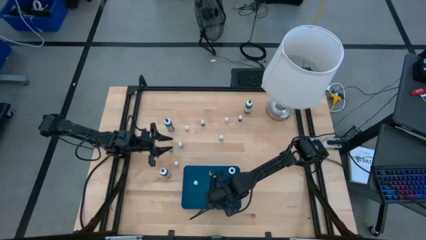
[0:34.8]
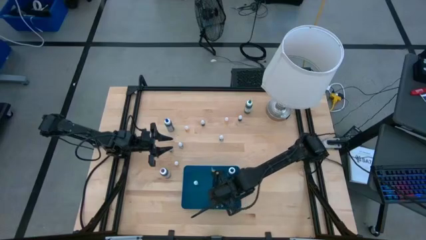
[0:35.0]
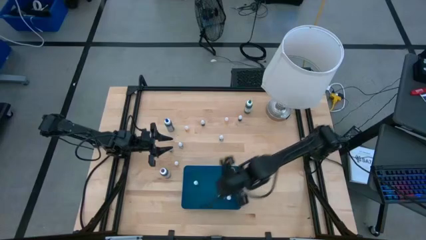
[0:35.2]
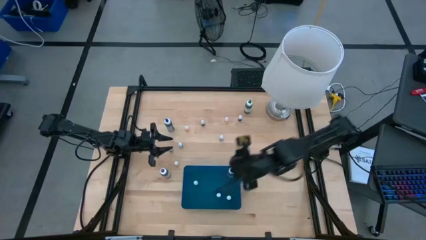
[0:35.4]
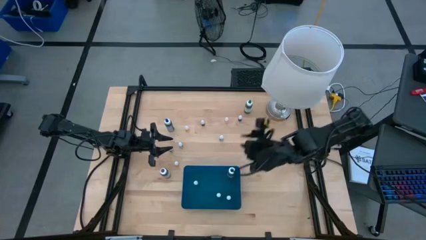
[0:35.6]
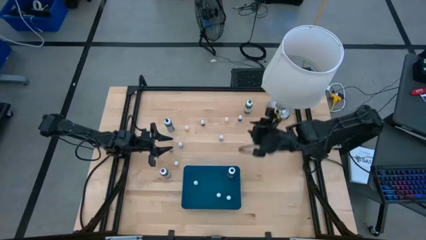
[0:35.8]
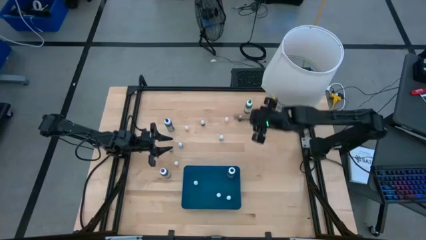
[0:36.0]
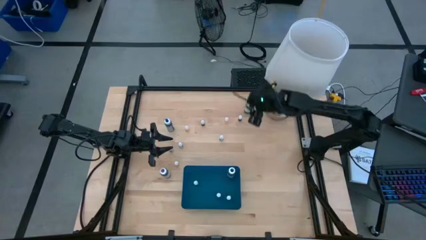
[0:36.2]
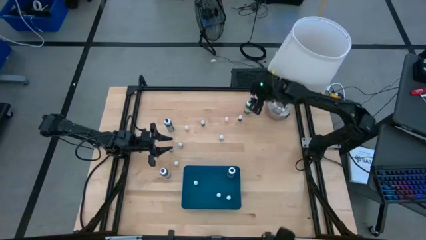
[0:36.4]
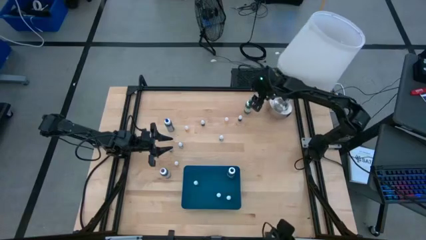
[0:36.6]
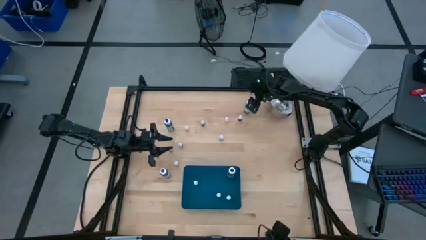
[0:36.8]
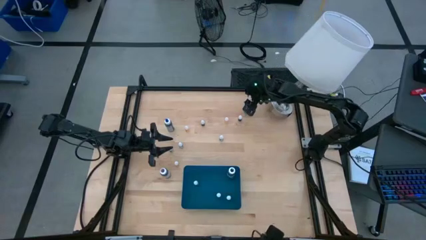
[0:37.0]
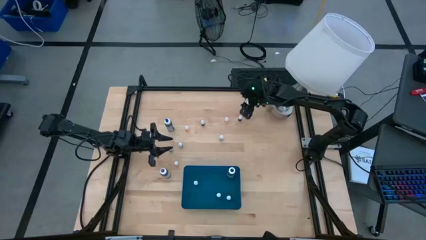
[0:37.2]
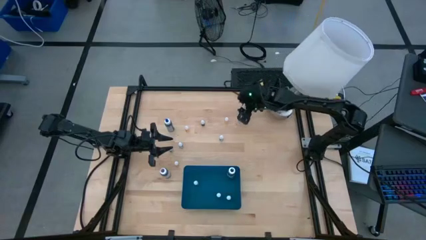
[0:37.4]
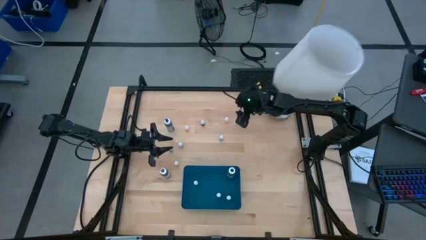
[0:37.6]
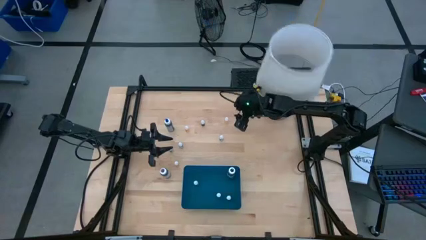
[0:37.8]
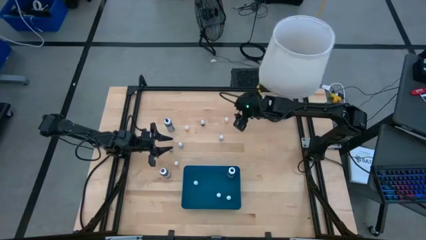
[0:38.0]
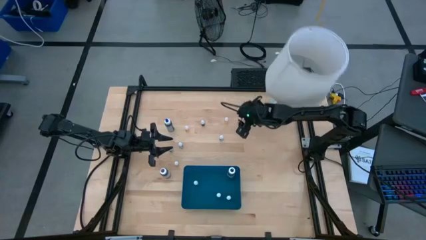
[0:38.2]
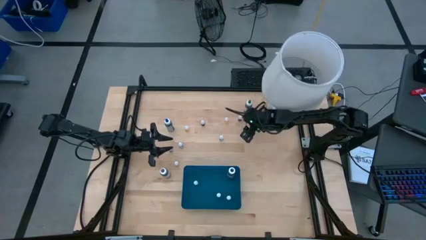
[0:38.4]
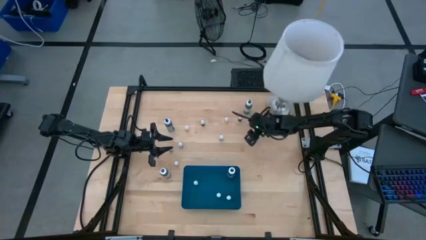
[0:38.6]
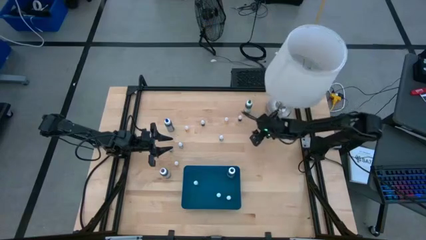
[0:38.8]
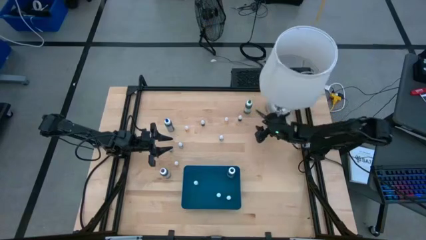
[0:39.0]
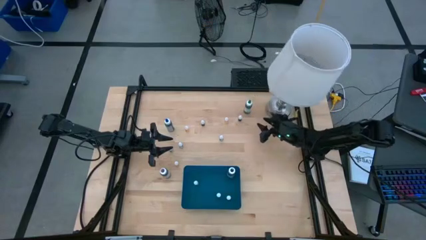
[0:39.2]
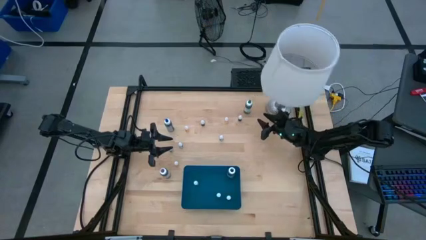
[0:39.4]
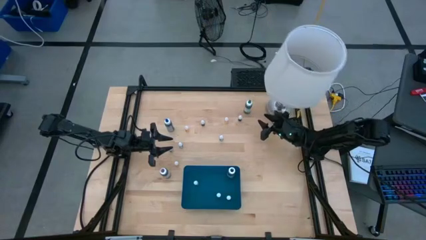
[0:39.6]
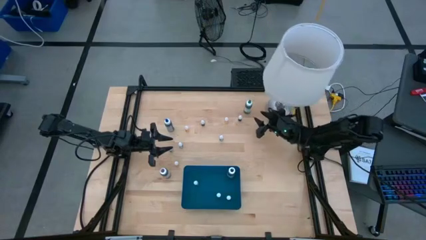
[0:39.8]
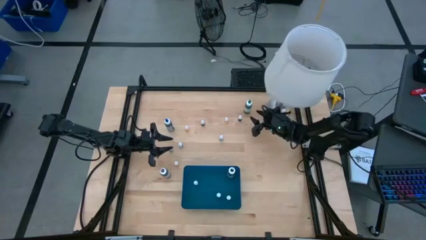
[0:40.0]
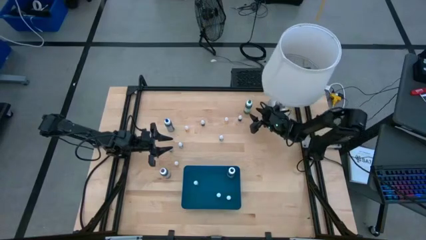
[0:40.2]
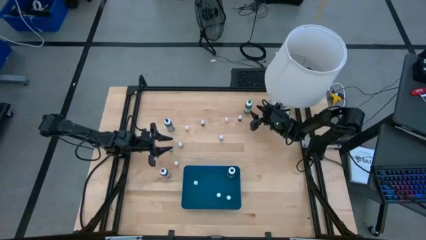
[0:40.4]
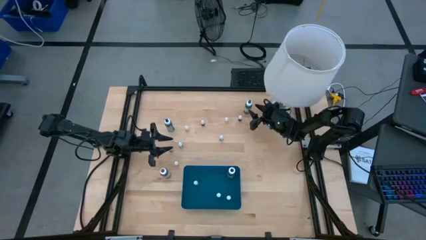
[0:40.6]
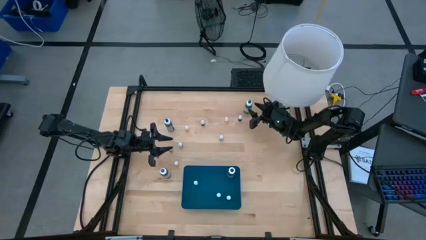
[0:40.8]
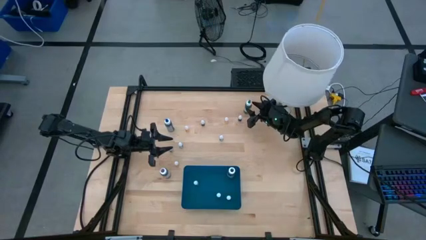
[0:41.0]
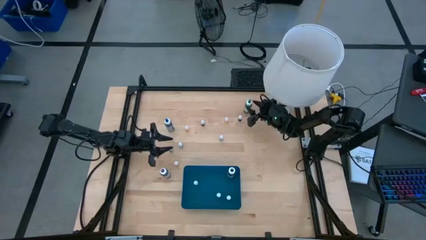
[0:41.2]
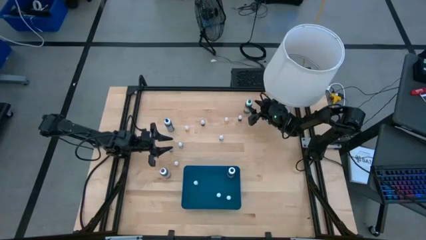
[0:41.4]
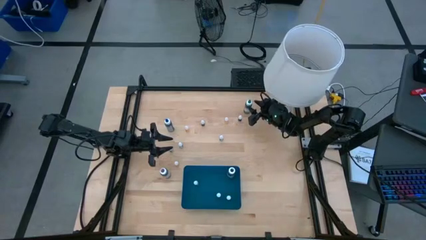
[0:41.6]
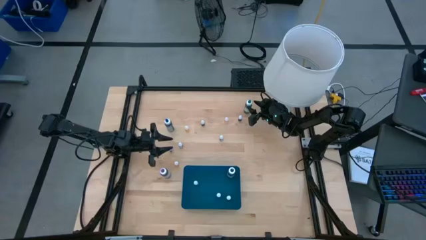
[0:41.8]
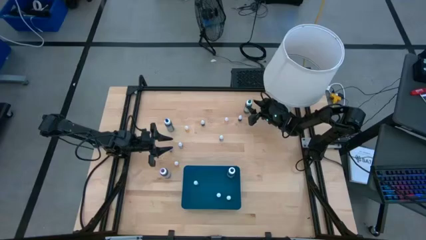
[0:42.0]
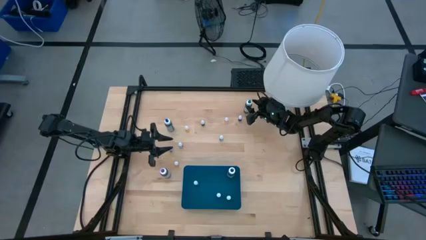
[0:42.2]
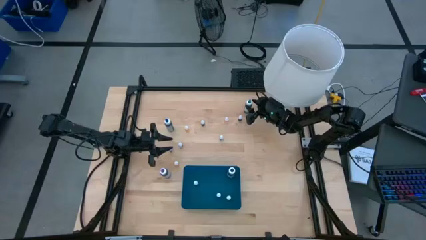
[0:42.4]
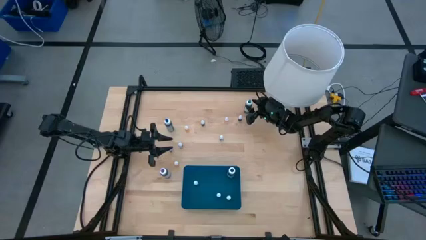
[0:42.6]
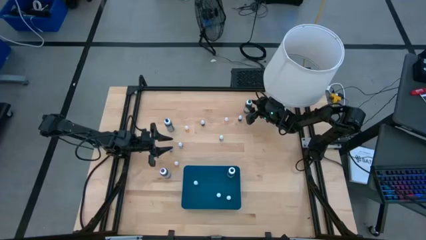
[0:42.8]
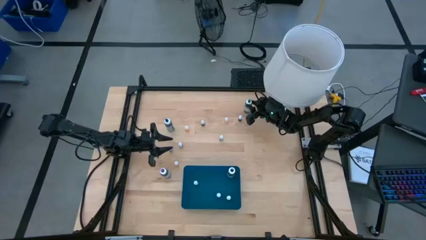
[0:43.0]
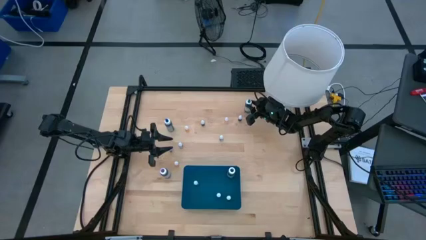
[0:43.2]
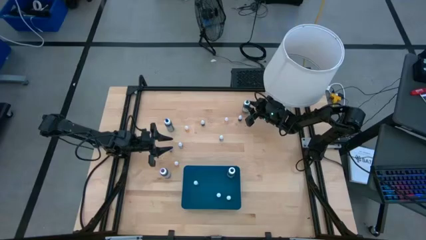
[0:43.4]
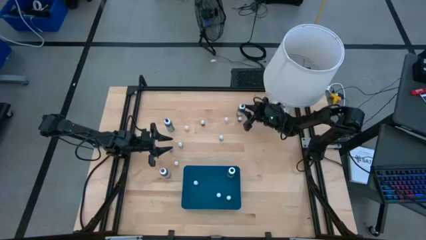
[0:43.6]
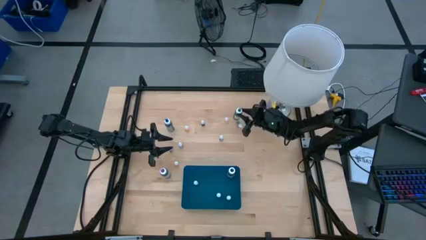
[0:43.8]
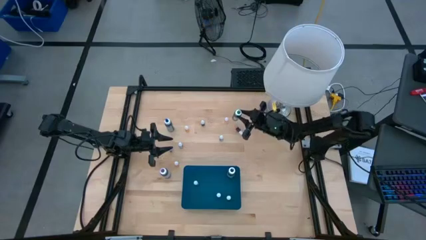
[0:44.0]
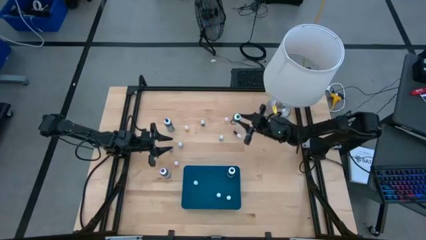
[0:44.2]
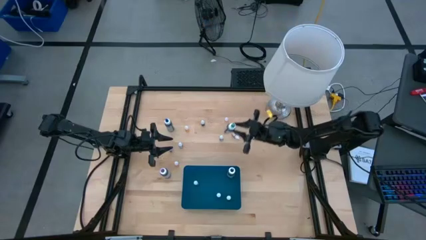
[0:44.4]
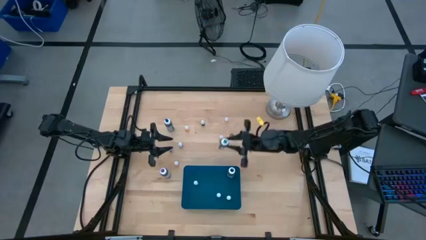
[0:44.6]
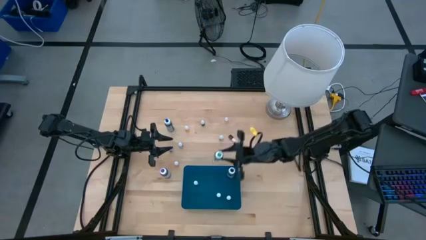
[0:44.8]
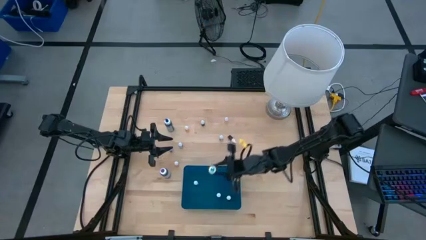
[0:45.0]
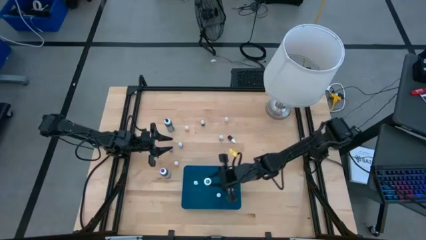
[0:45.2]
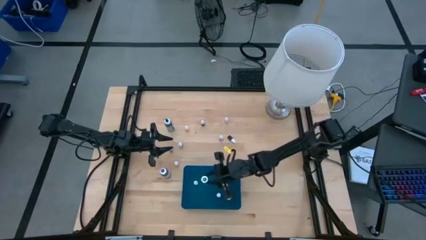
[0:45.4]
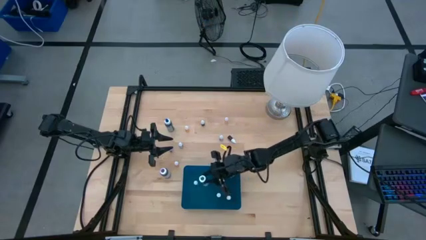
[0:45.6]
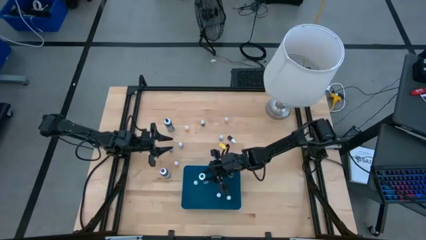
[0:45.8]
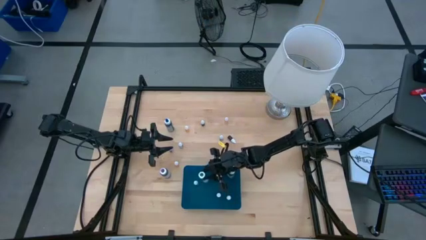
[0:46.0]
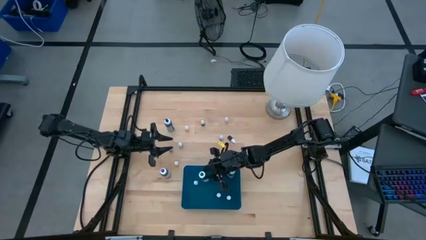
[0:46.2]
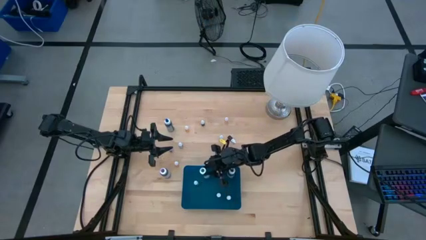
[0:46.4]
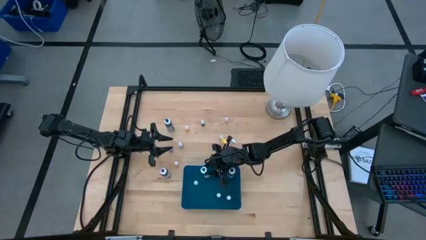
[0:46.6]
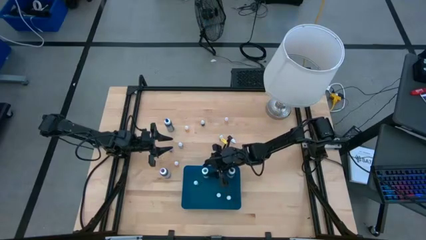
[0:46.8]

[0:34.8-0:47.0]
Task: Pick & Place food coloring
Put the large green food coloring bottle into the blue container

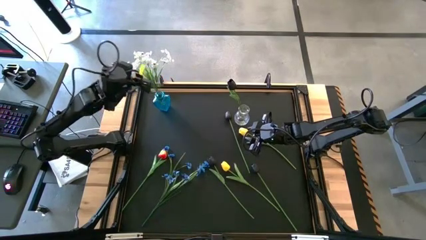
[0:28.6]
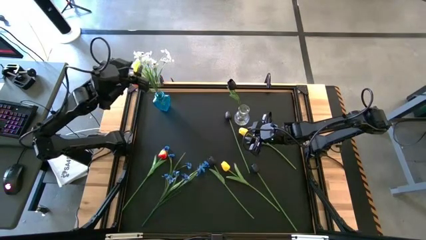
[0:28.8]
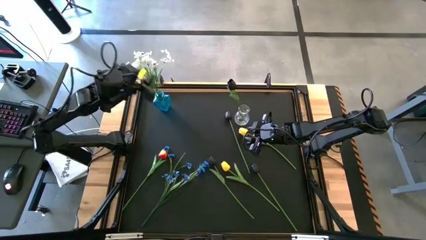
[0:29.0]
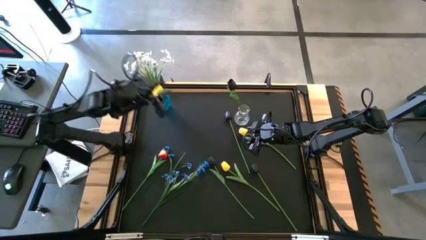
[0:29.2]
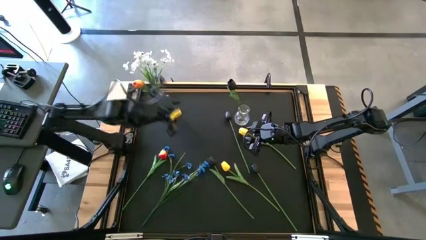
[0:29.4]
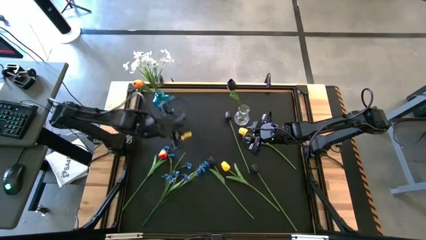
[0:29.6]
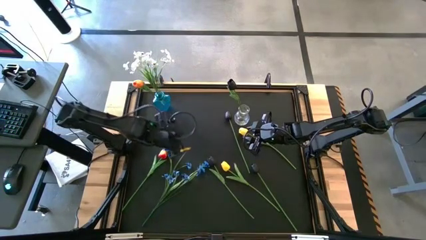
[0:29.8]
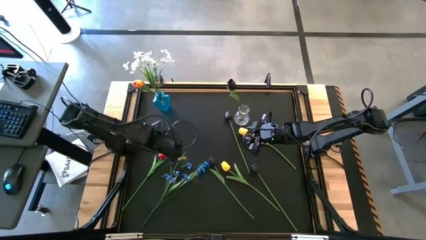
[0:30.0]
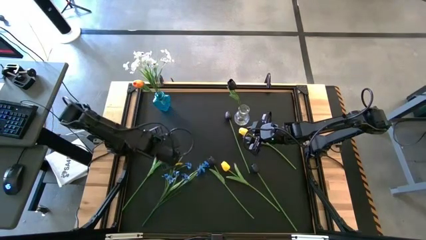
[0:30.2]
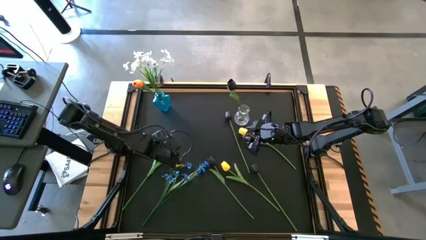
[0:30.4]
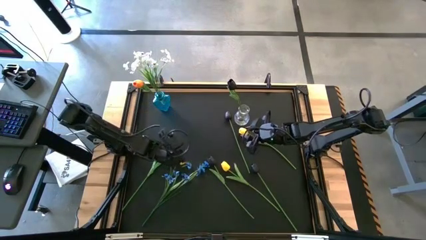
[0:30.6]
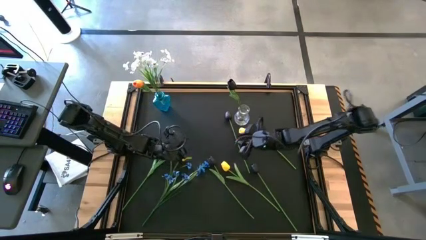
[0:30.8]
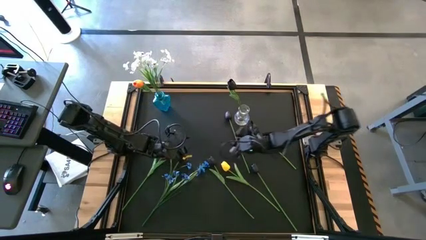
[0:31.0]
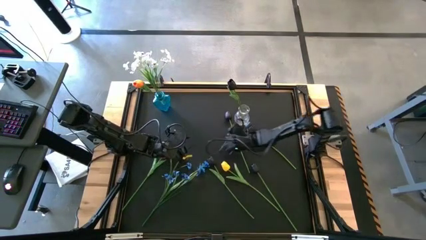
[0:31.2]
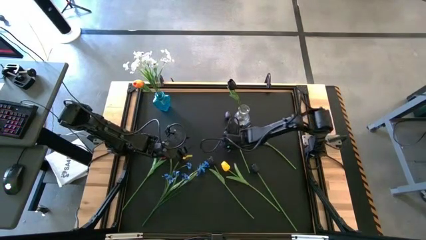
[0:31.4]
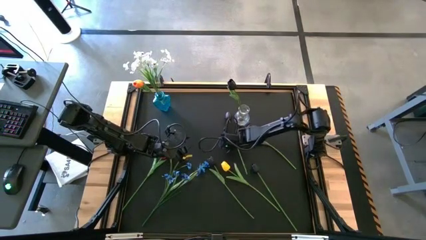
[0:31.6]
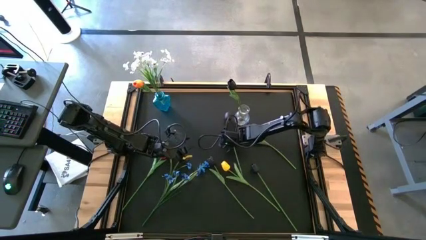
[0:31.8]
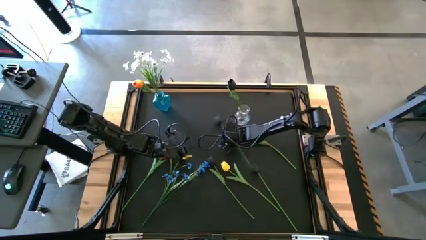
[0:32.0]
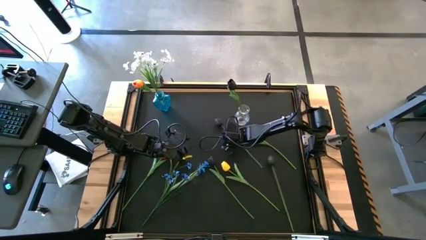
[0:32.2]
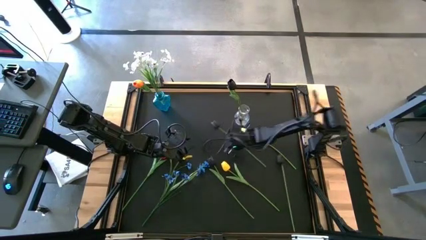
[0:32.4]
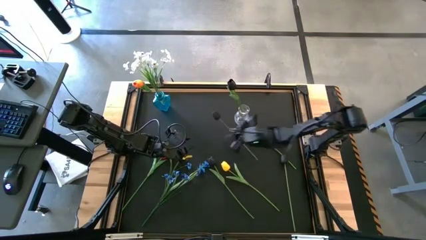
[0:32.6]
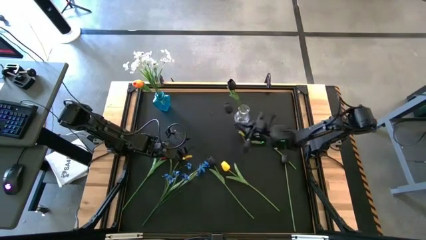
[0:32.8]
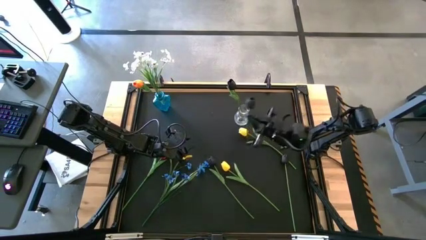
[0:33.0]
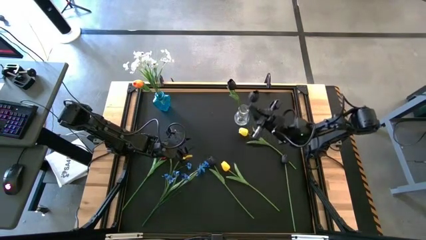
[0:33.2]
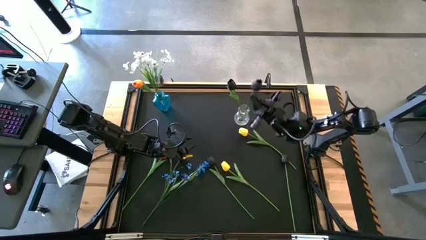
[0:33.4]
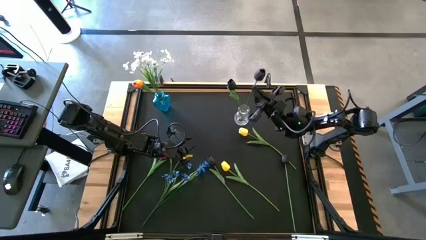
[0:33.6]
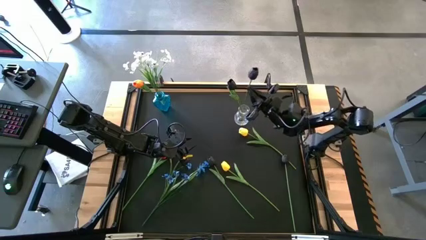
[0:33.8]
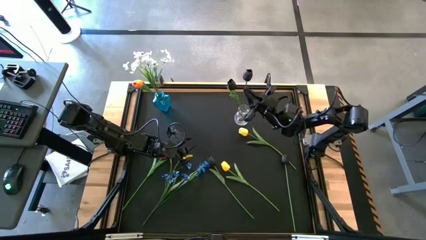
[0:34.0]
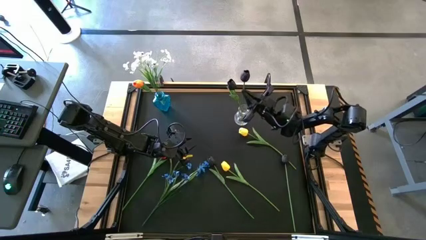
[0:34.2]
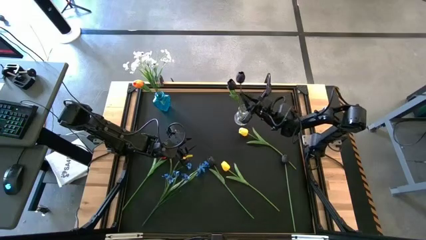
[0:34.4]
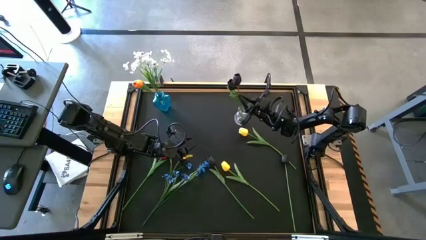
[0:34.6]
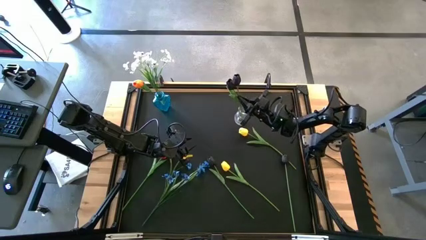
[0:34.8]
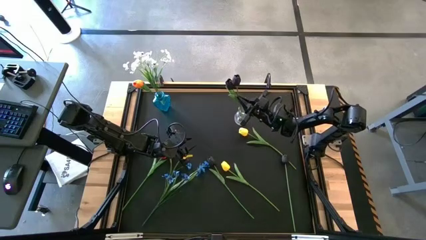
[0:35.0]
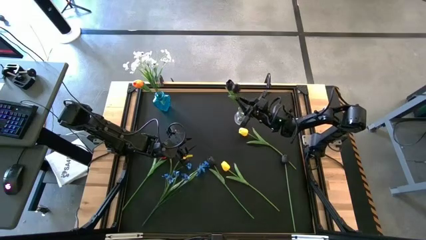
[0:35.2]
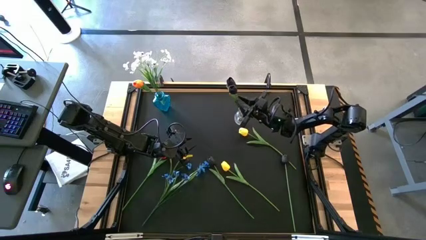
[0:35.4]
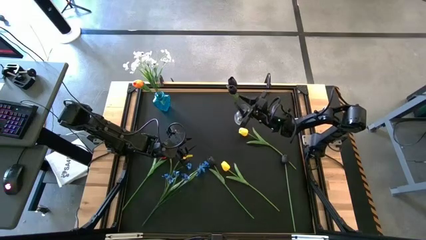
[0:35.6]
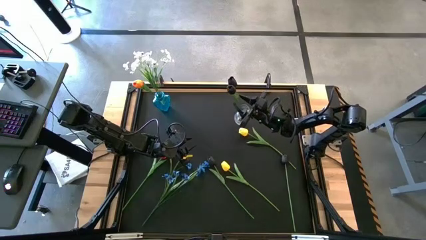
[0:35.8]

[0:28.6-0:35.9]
Task: Sort flowers into vase by color
Put the black flower into the transparent vase
